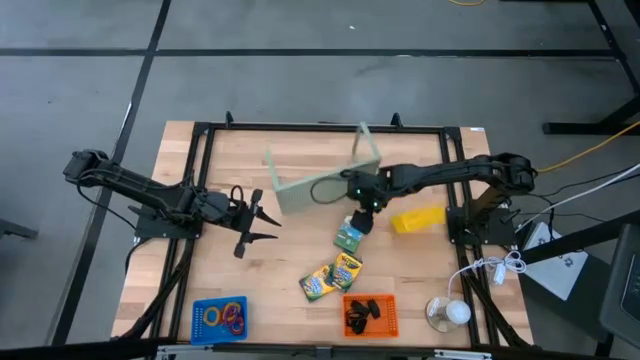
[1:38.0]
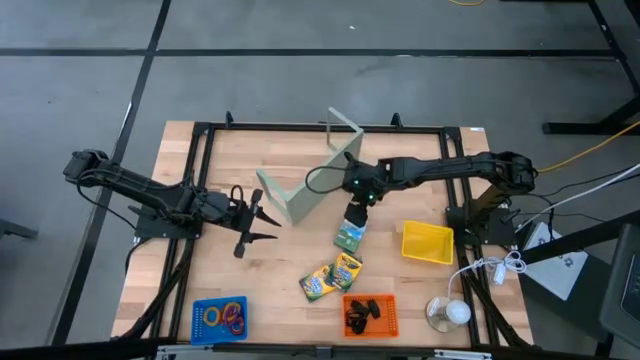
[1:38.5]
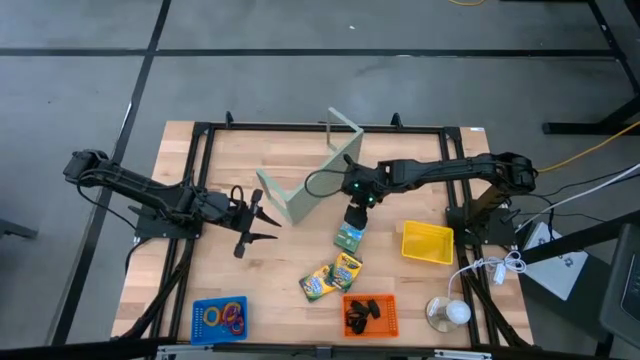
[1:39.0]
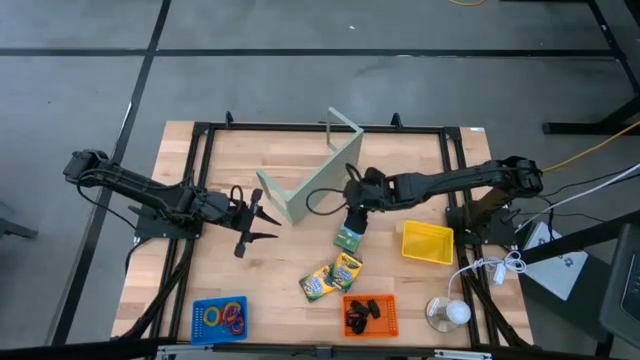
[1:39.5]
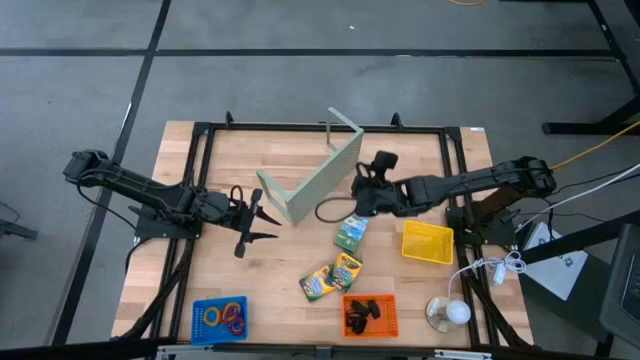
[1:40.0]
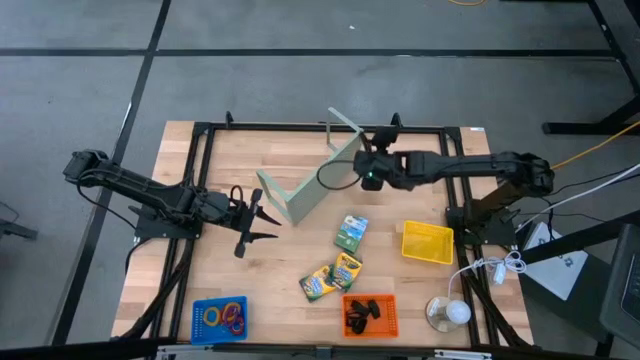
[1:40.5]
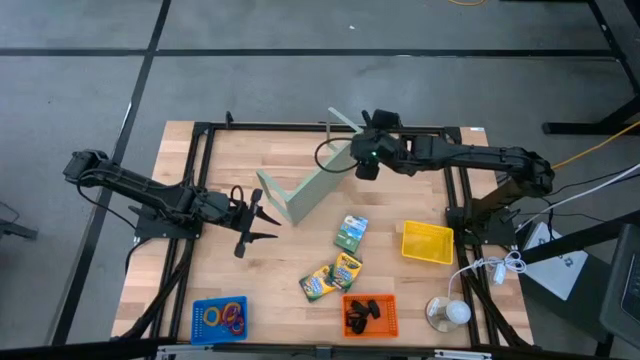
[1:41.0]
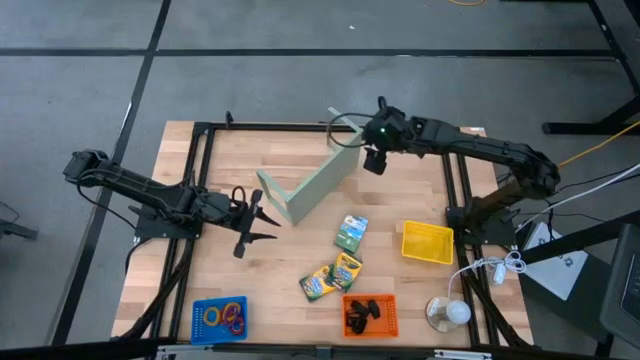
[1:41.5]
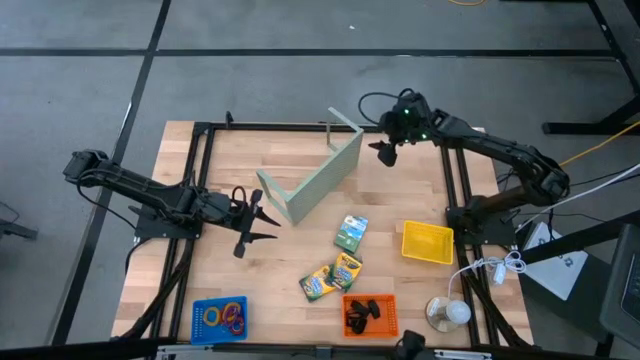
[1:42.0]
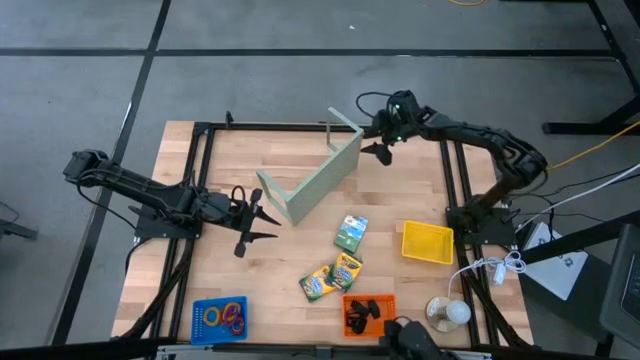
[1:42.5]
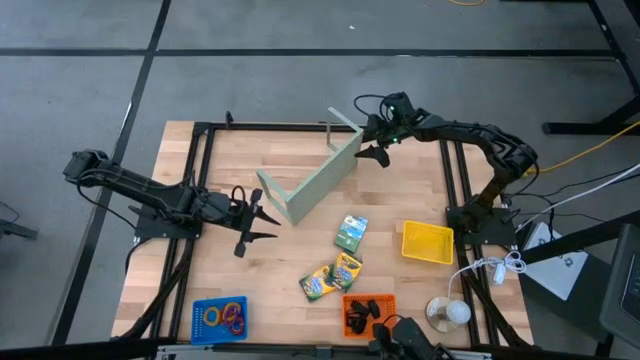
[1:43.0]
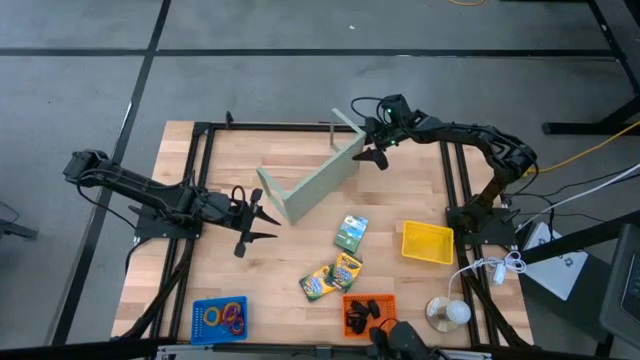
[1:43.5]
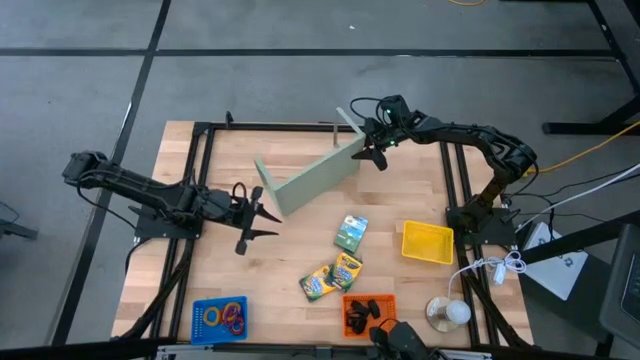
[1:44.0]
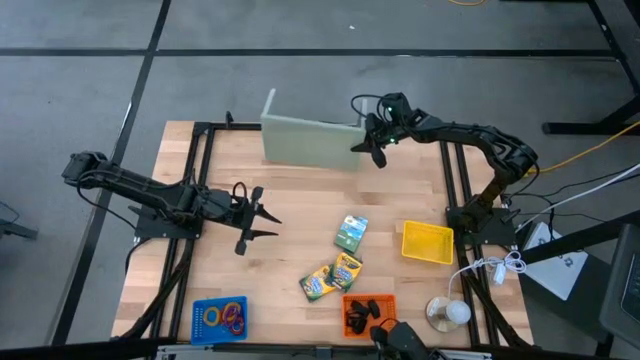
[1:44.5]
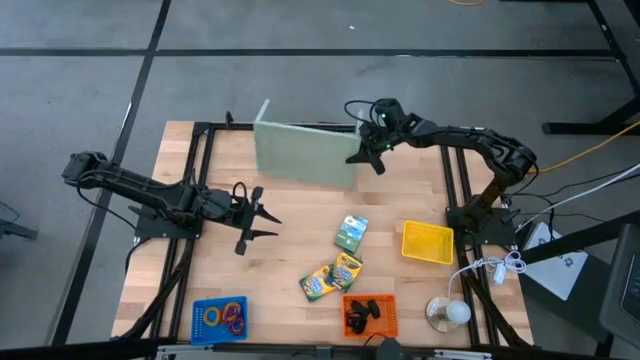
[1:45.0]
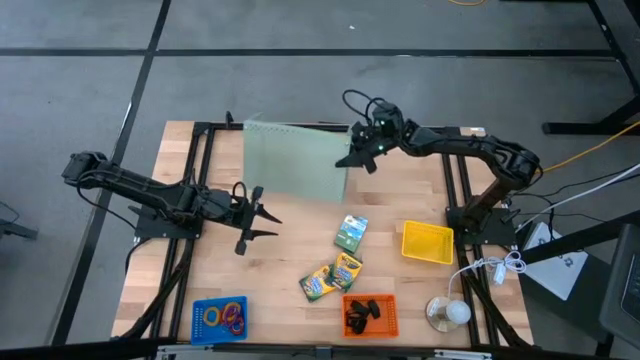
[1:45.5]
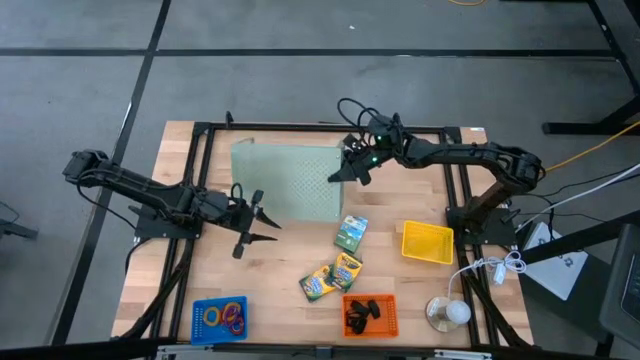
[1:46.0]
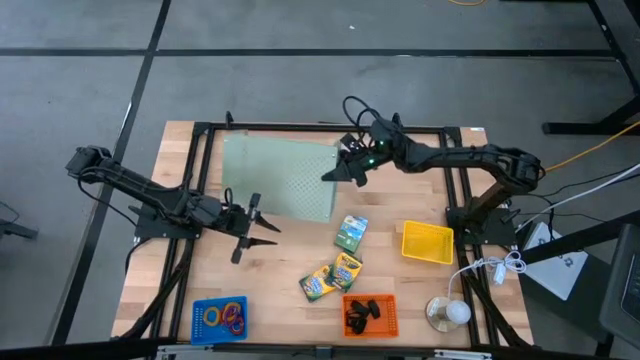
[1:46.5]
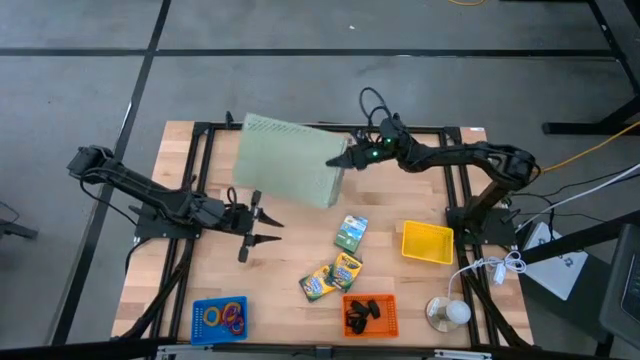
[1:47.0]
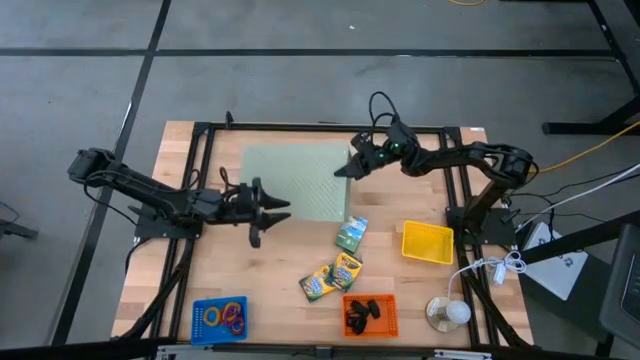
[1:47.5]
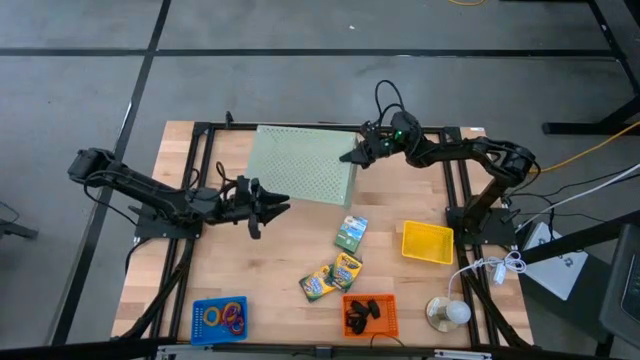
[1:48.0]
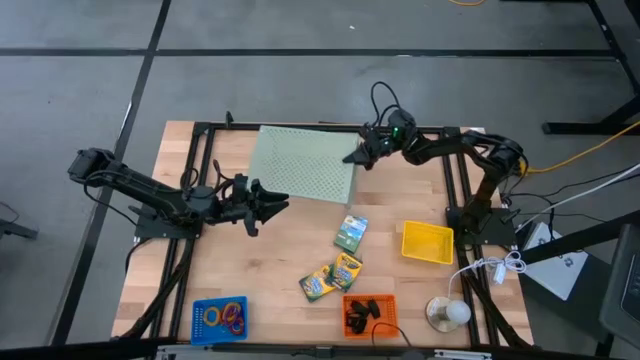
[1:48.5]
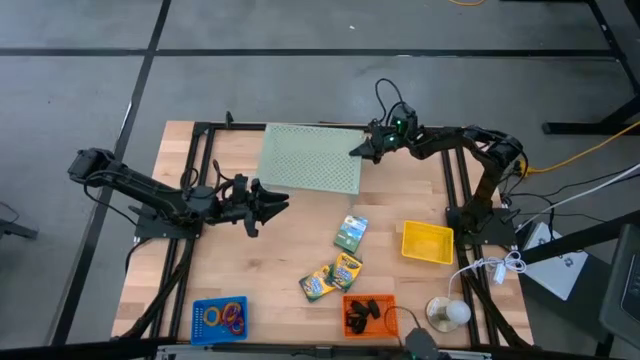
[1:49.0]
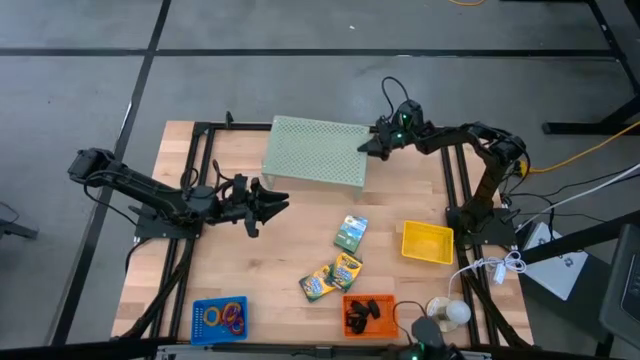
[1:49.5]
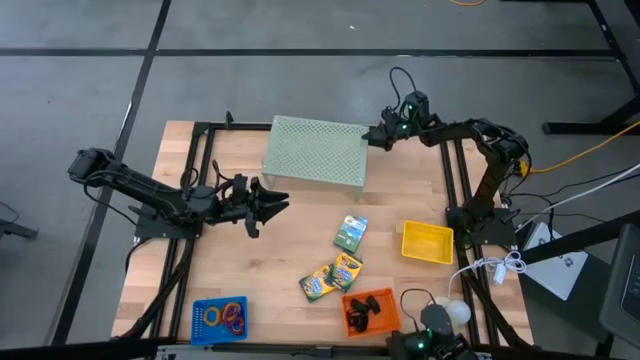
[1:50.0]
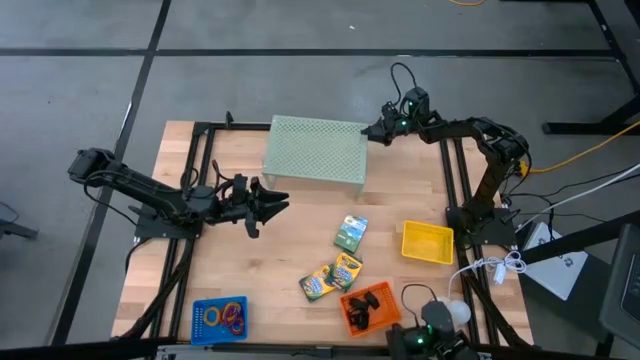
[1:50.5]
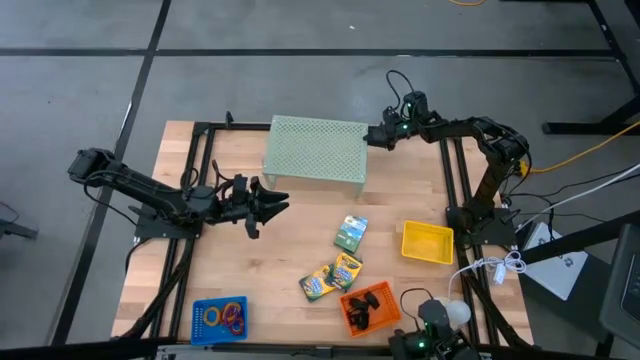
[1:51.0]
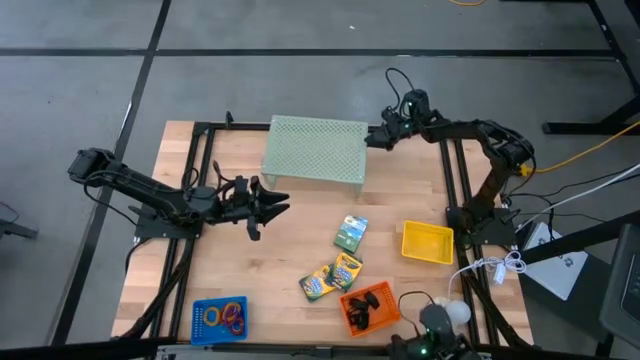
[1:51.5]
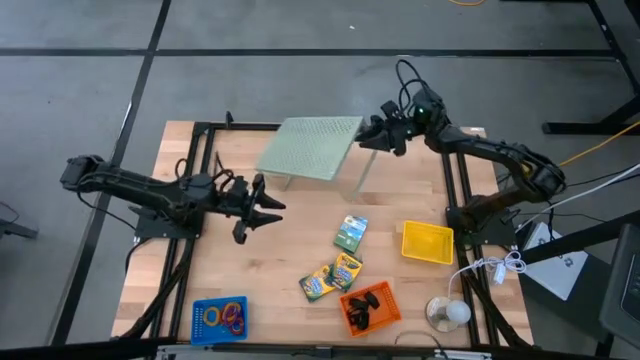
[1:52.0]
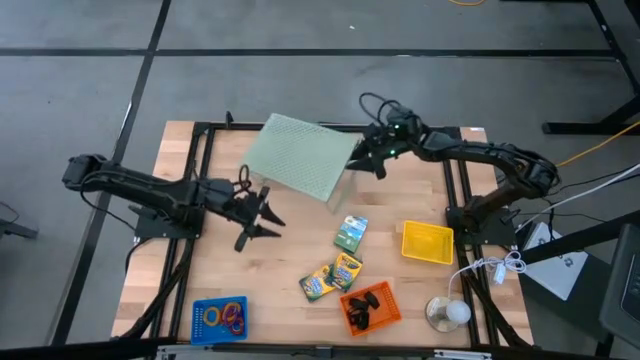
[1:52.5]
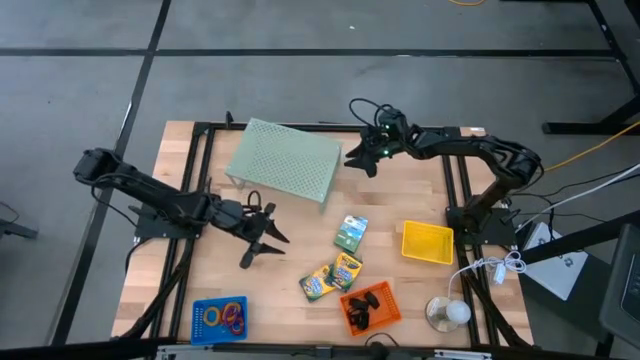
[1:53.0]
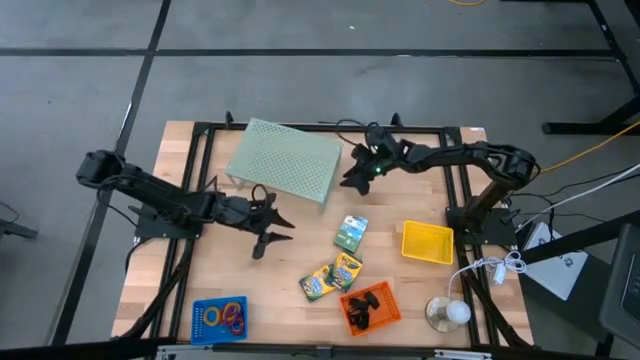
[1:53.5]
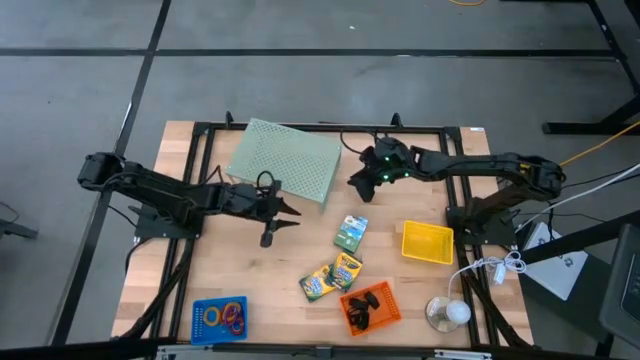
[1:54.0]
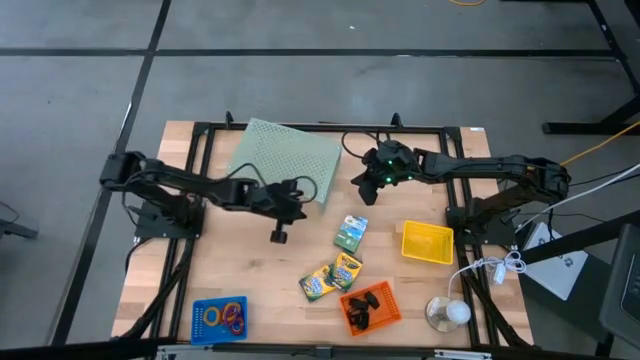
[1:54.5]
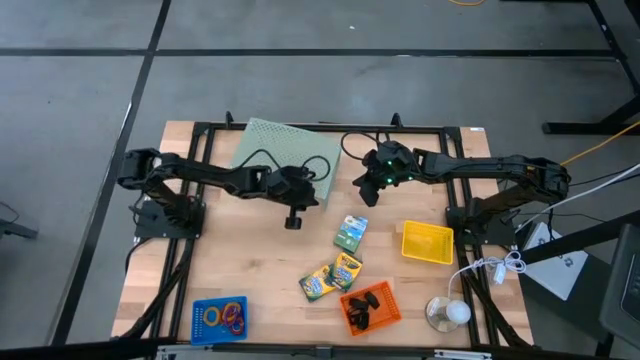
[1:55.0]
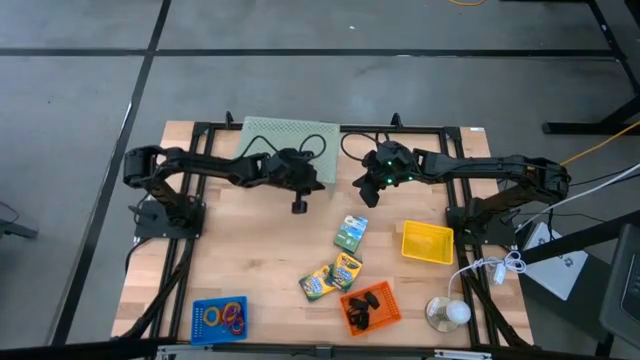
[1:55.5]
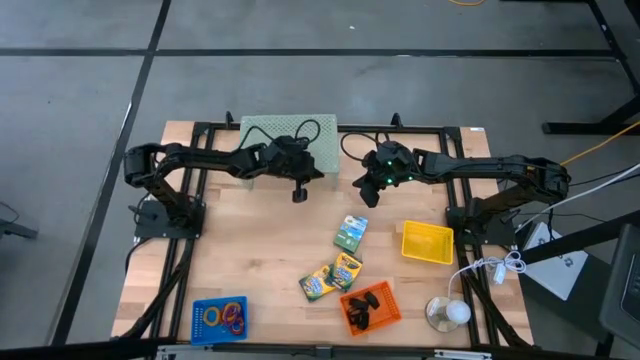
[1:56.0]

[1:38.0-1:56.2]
Task: Pick & Place Office Desk Supplies
Adjust the shelf

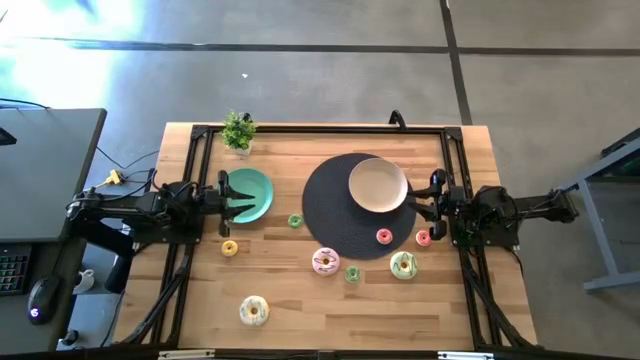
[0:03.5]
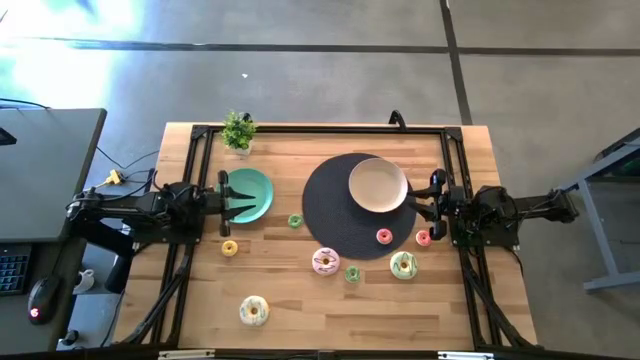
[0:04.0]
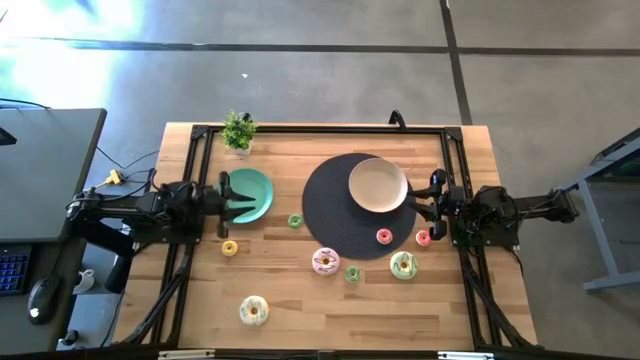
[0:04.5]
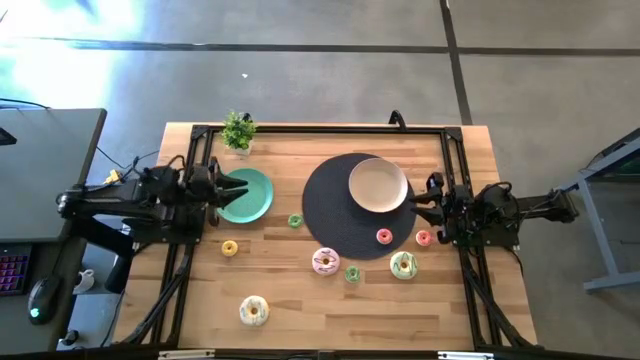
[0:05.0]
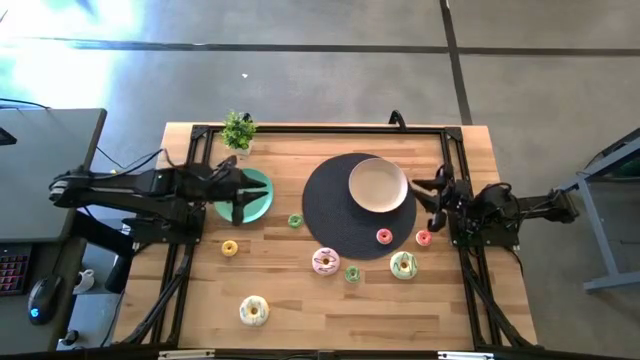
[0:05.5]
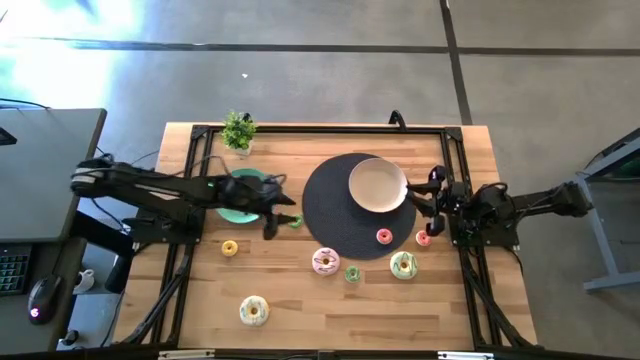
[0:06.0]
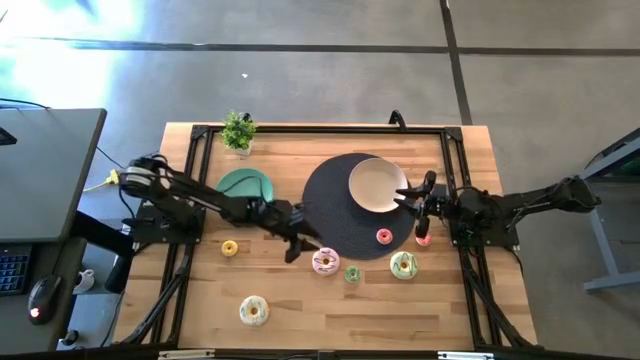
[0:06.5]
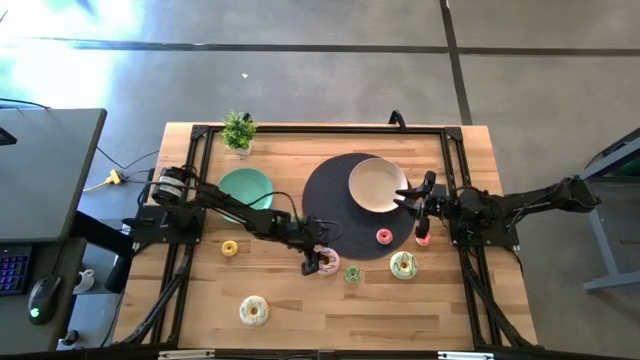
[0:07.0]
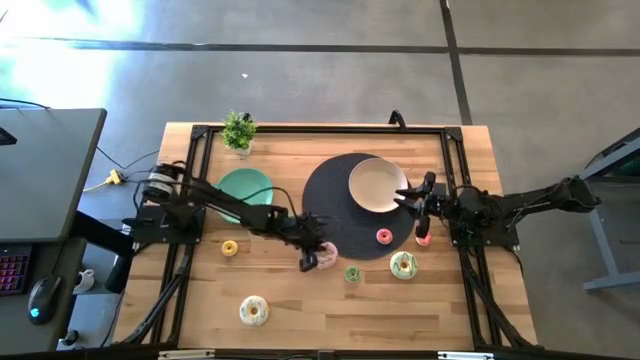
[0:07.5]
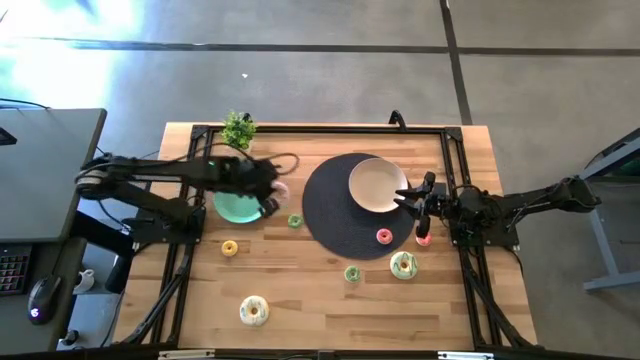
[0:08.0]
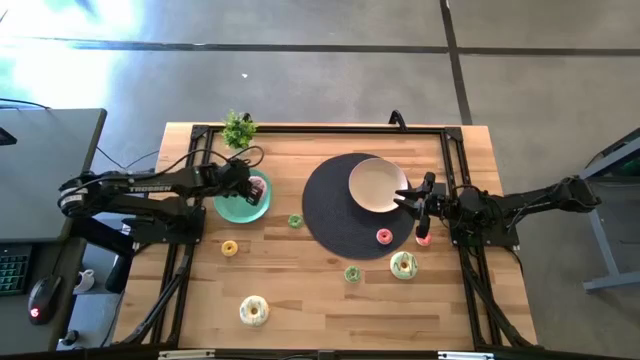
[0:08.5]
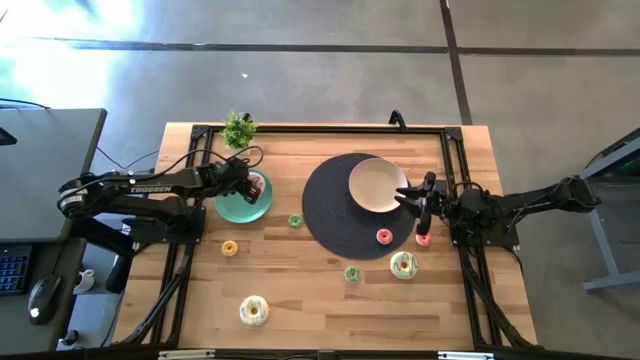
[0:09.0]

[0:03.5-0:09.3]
Task: Pick & Place donuts
Put the pink donut into the green plate
